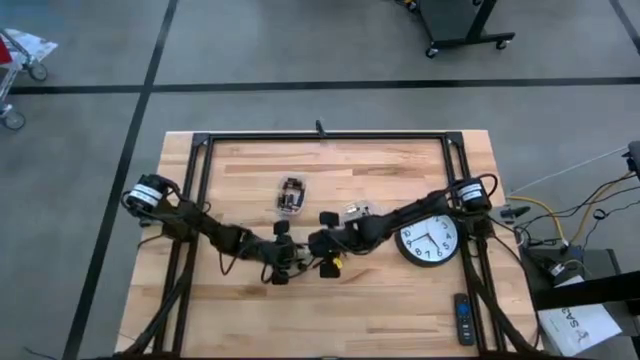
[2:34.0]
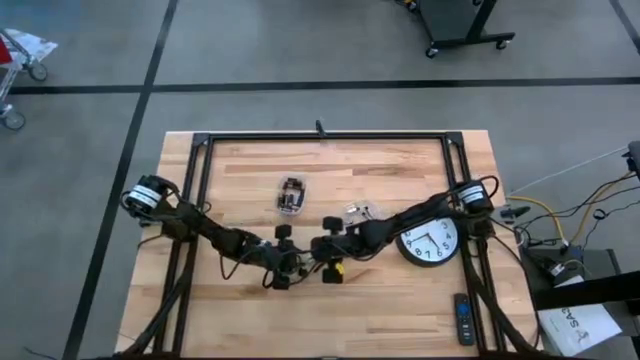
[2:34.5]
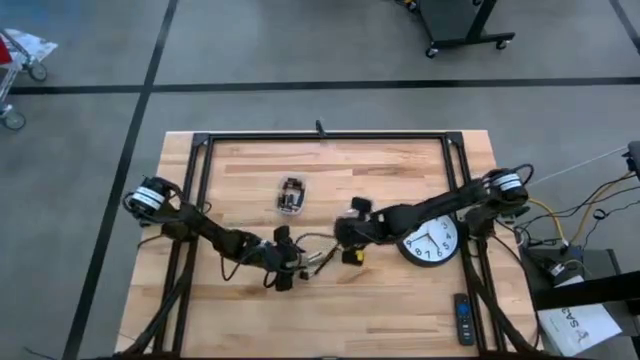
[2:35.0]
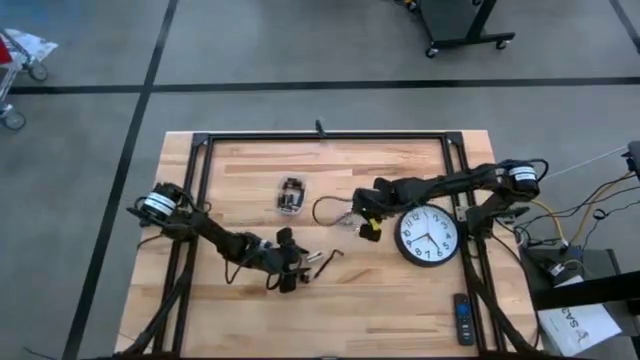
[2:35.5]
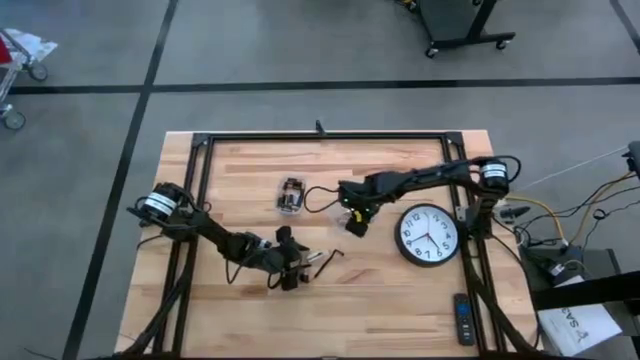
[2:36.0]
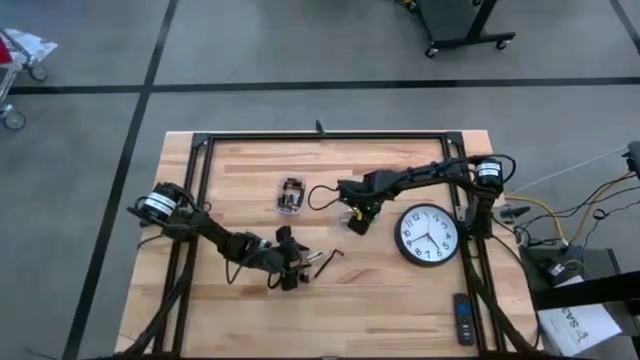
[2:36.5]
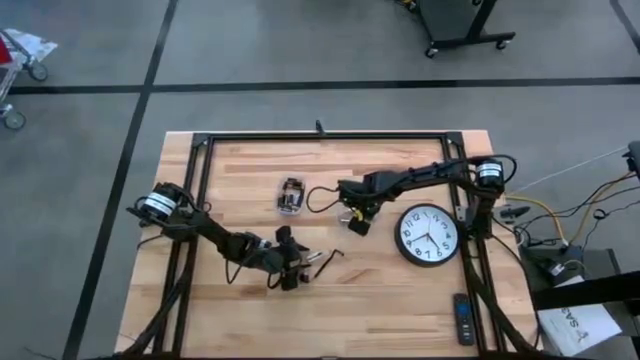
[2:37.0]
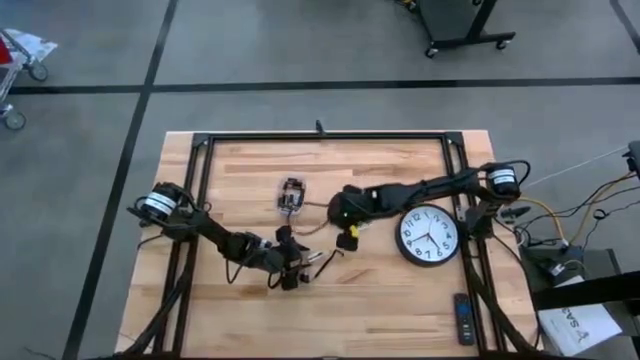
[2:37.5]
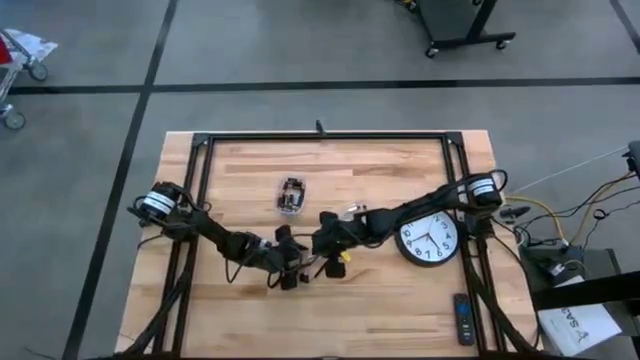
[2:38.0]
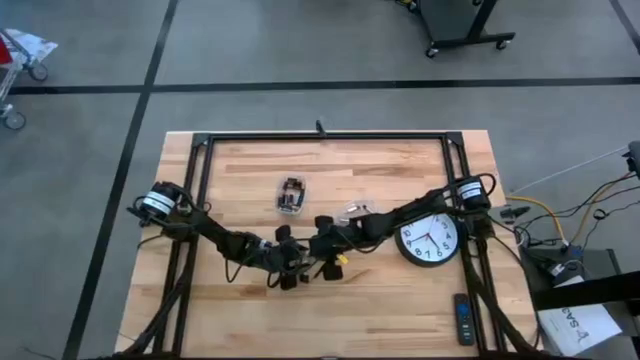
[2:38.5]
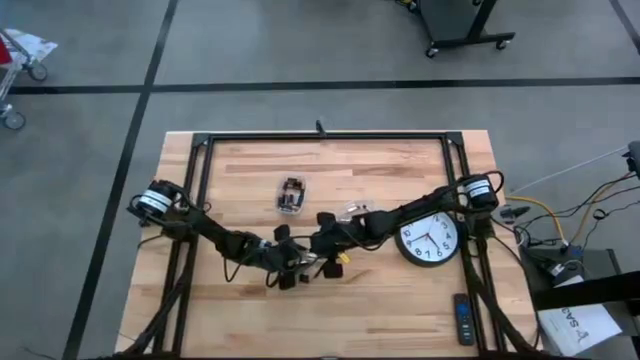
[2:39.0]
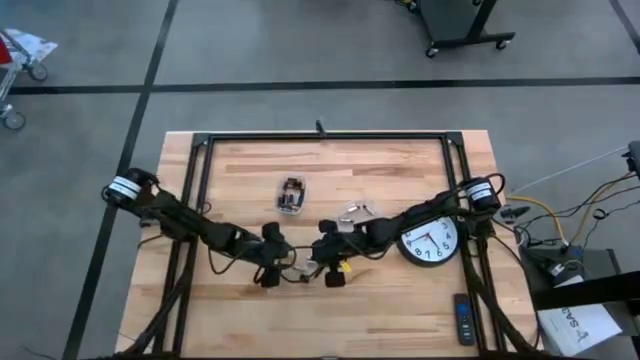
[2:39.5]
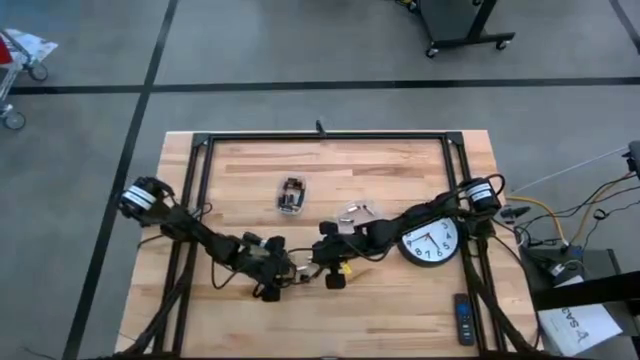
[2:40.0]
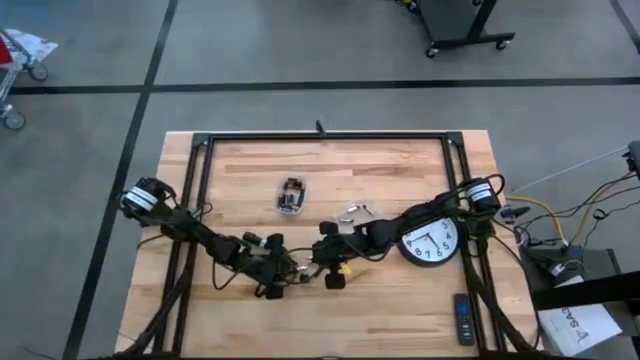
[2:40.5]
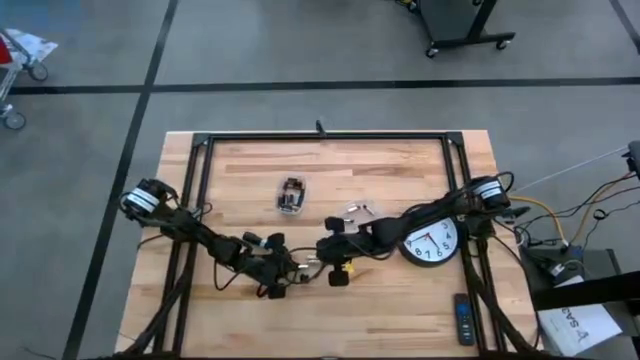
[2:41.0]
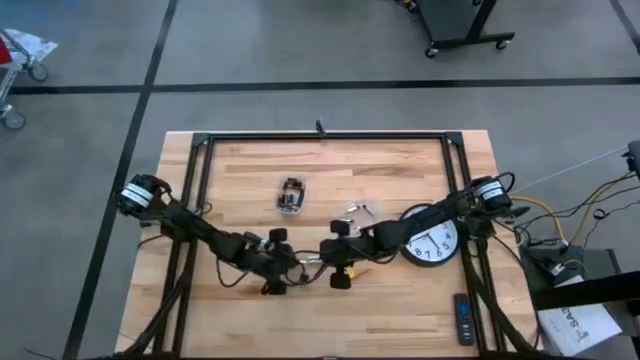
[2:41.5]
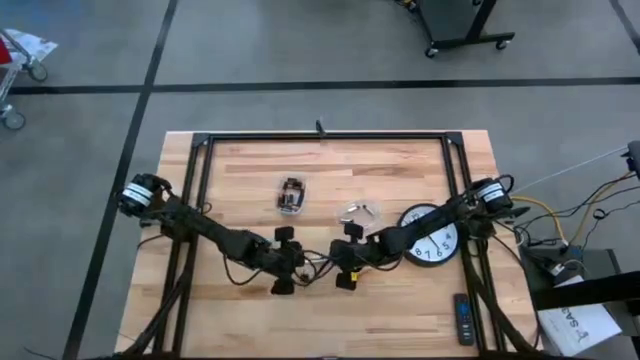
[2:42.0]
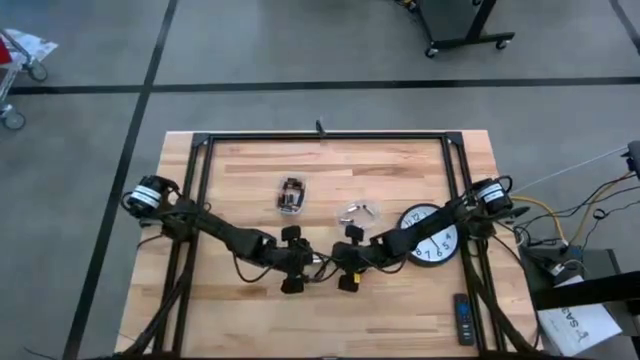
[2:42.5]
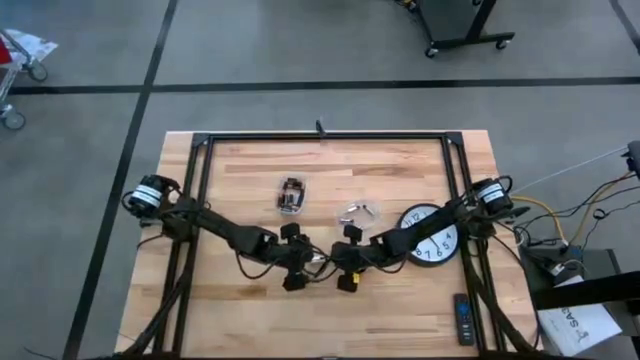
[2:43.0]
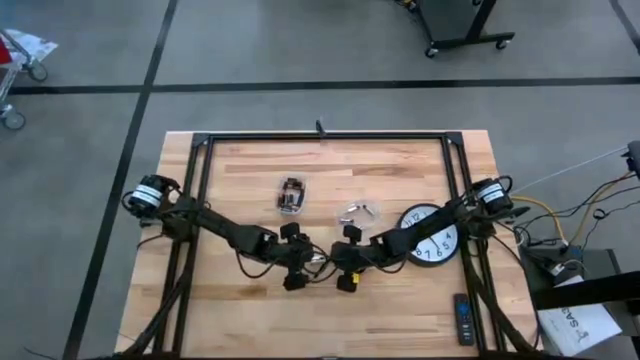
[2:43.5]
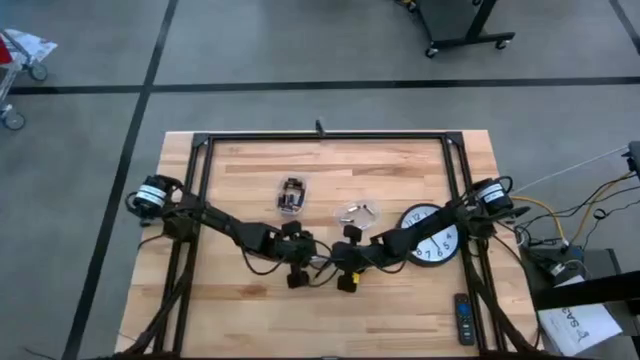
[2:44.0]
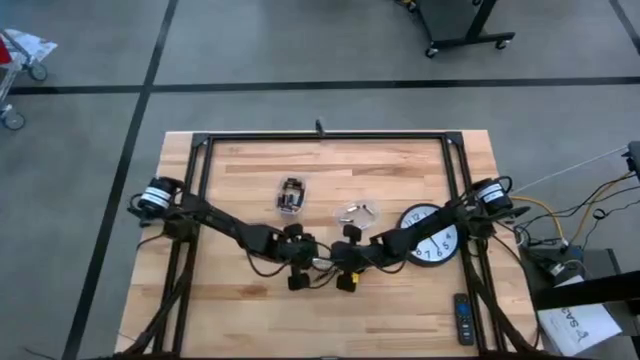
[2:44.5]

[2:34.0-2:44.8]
Task: Insert battery
Insert the silver battery into the flashlight's battery compartment

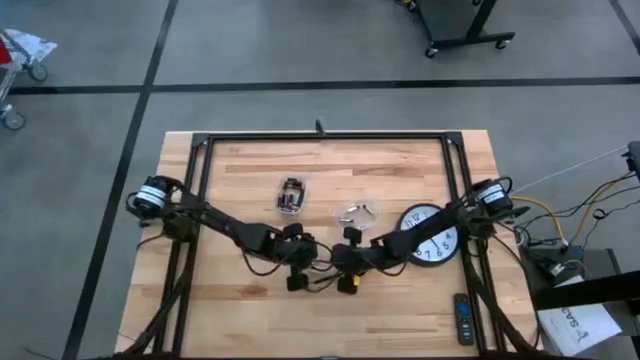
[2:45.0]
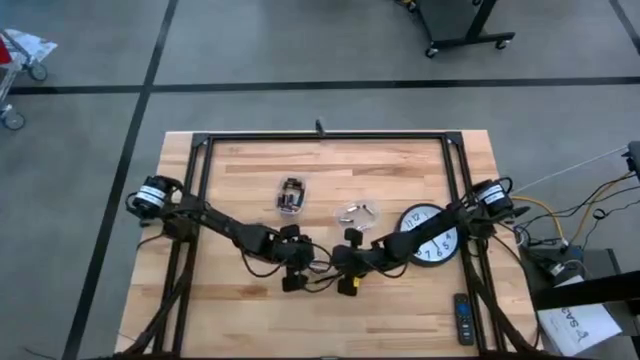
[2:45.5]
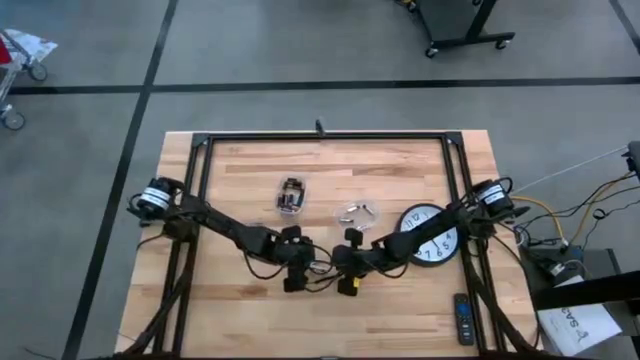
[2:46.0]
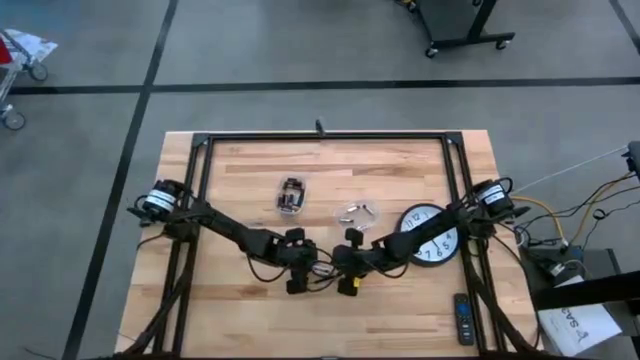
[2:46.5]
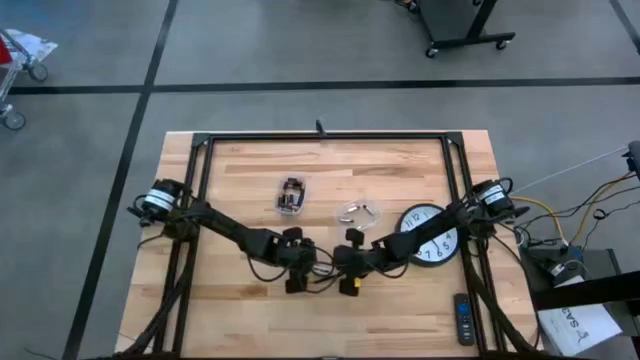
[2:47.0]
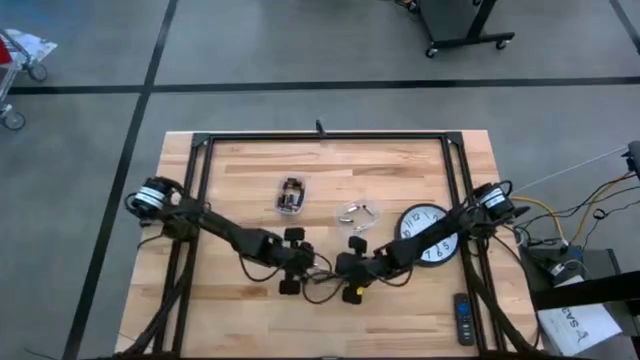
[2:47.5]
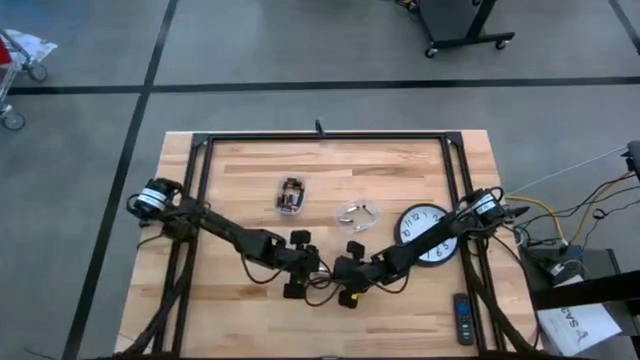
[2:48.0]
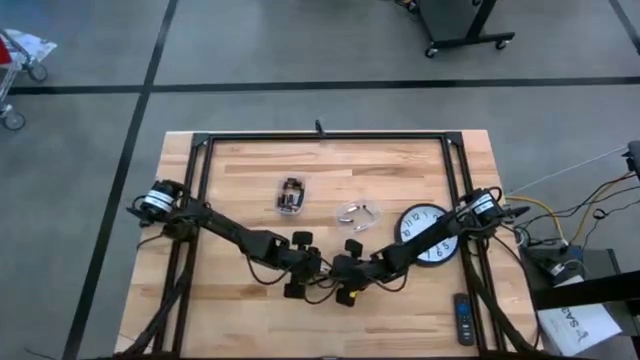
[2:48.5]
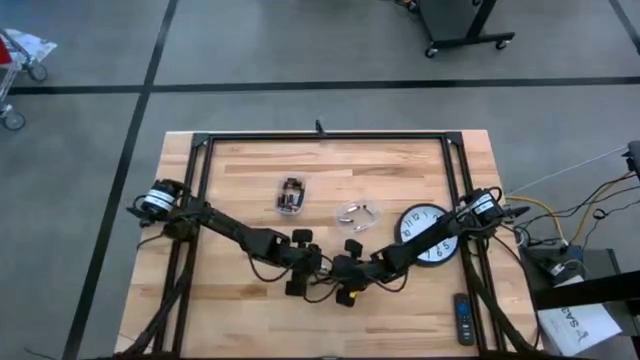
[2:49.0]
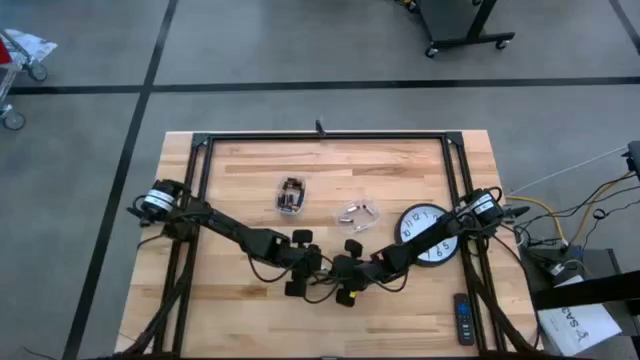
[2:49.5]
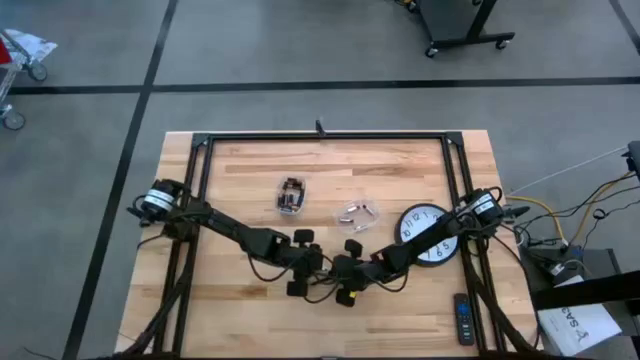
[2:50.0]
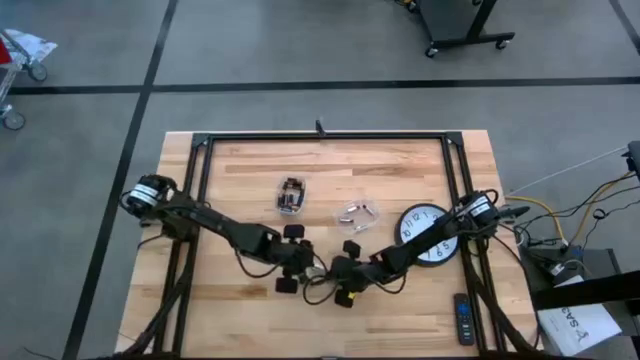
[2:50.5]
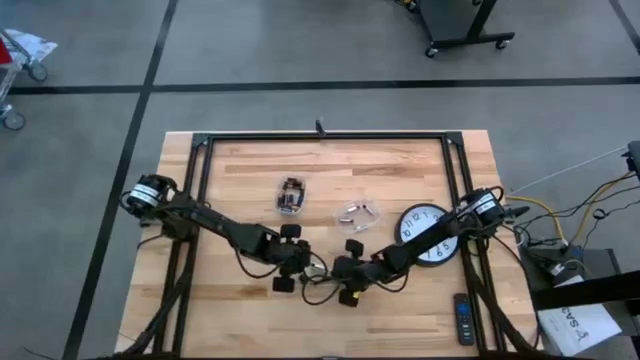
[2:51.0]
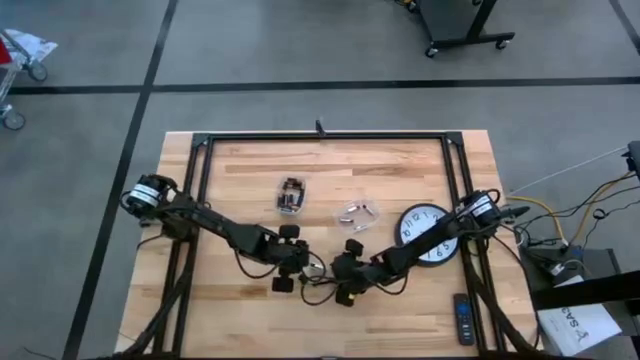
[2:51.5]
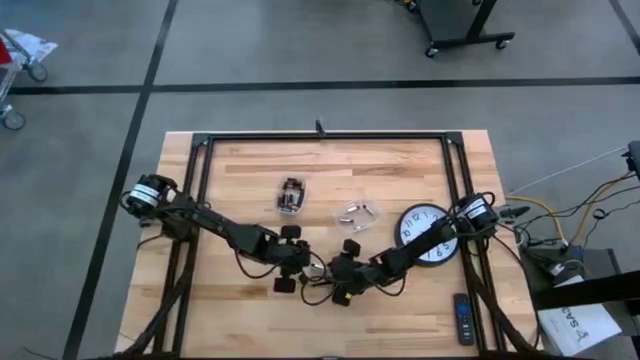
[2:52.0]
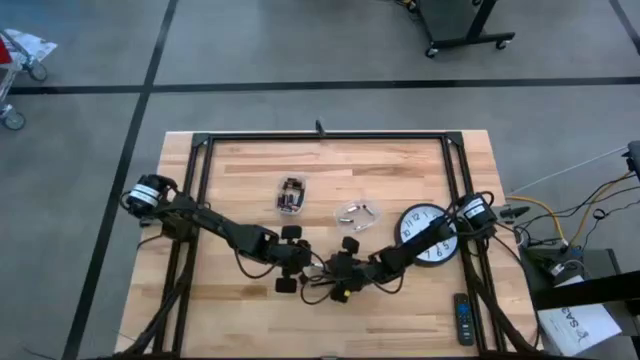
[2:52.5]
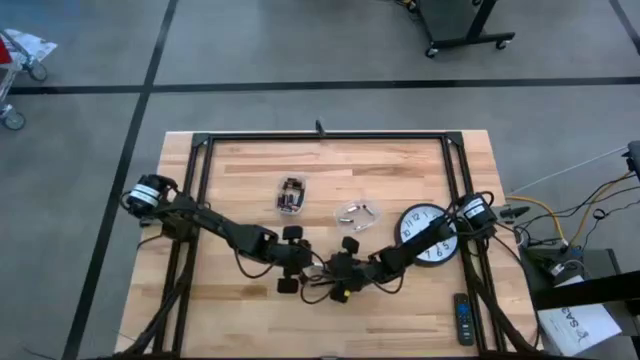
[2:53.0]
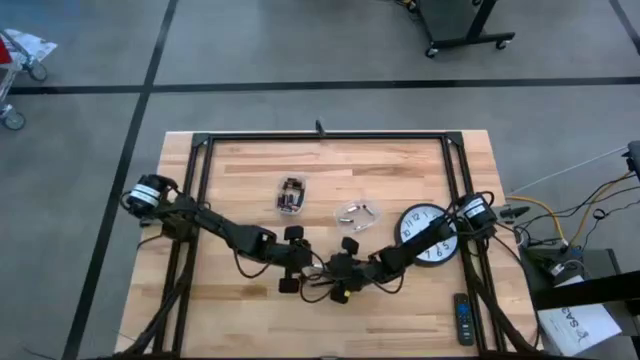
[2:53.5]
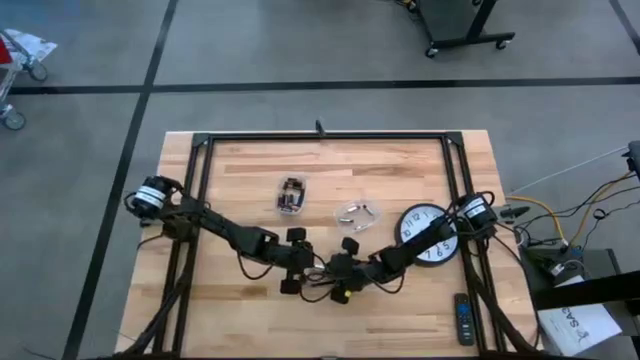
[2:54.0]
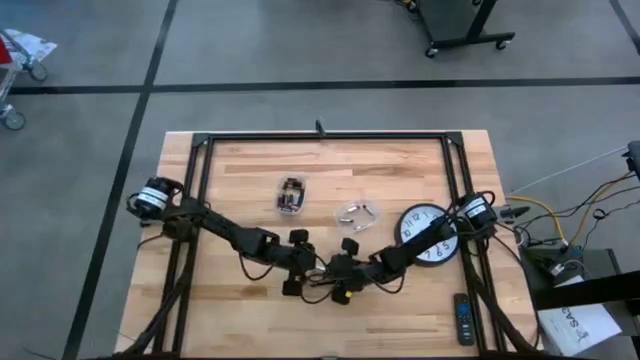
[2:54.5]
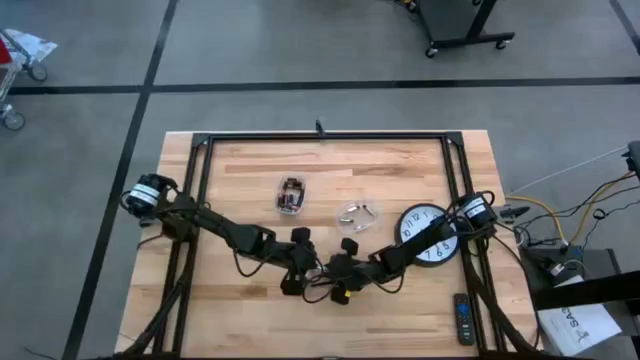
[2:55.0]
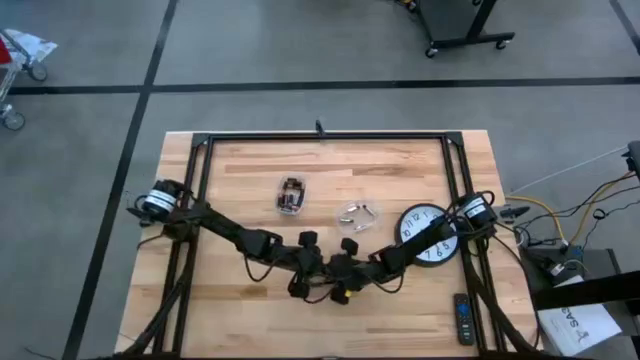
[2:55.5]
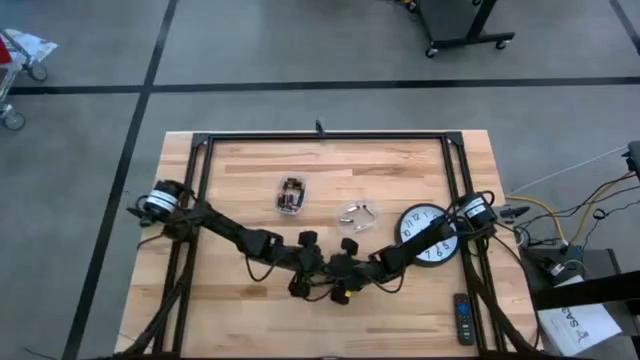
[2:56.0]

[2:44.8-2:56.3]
Insert the silver battery into the flashlight's battery compartment
